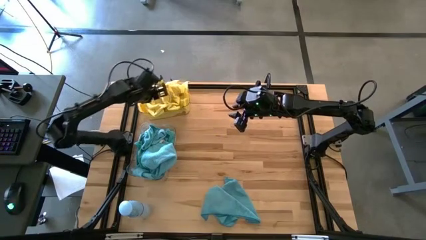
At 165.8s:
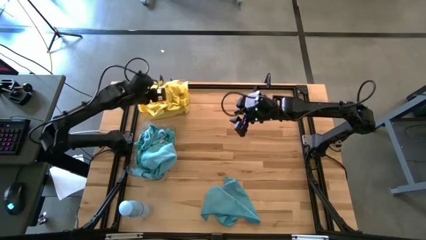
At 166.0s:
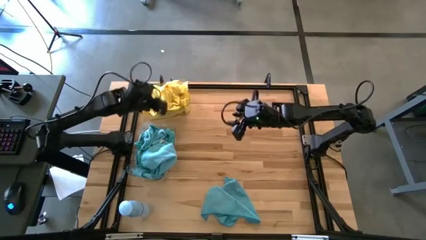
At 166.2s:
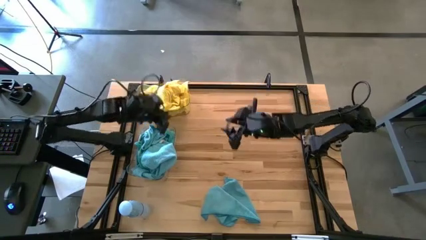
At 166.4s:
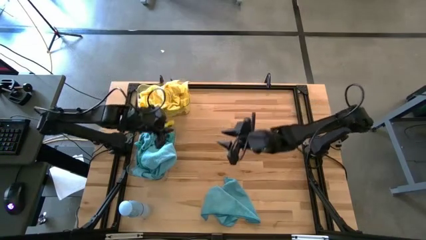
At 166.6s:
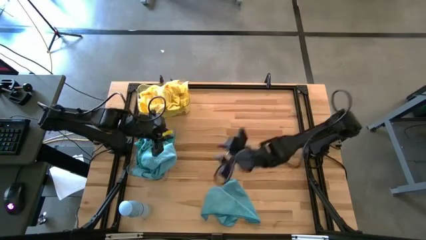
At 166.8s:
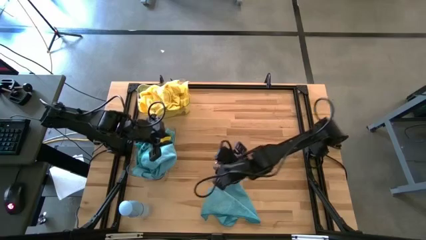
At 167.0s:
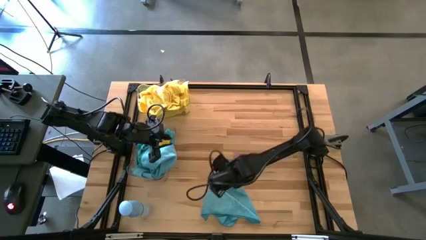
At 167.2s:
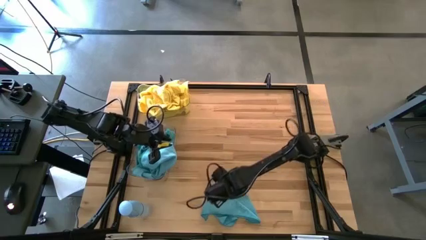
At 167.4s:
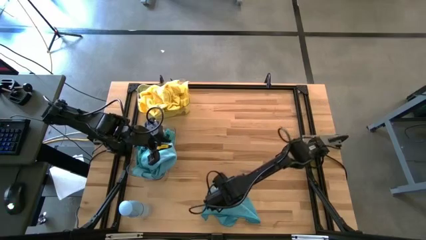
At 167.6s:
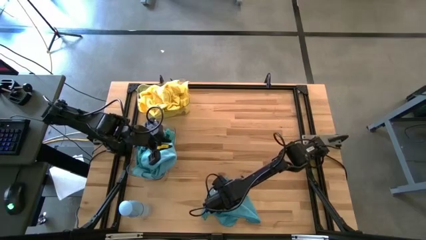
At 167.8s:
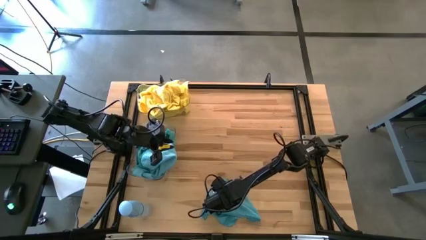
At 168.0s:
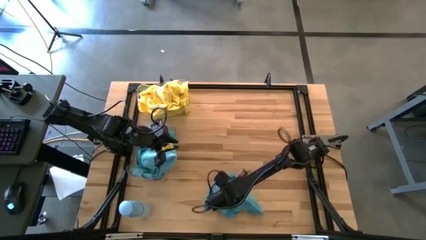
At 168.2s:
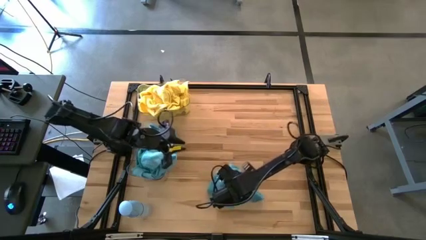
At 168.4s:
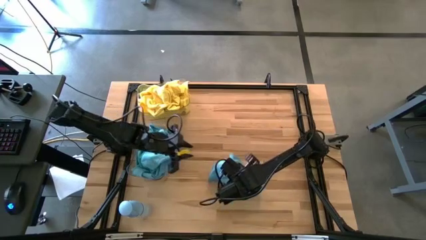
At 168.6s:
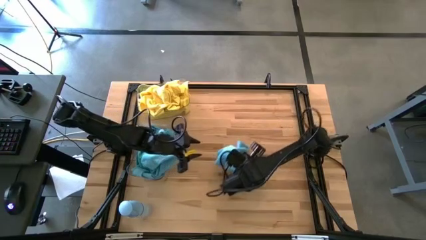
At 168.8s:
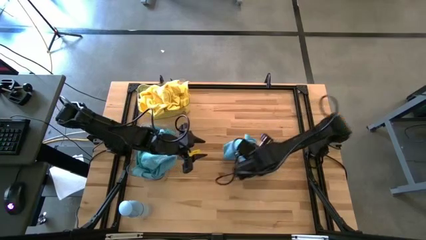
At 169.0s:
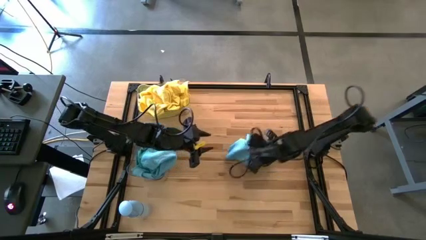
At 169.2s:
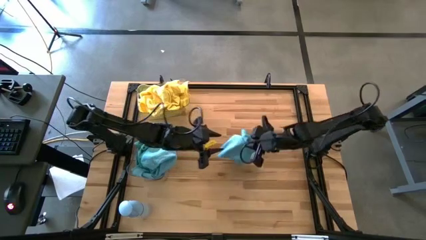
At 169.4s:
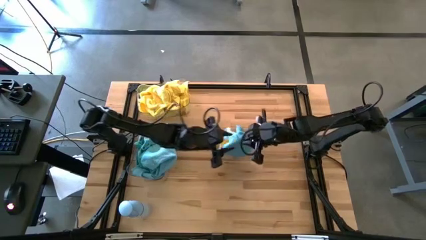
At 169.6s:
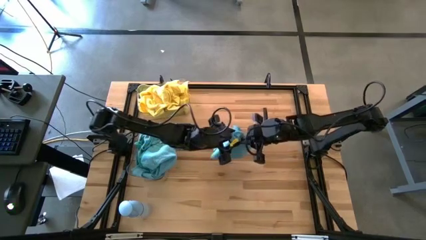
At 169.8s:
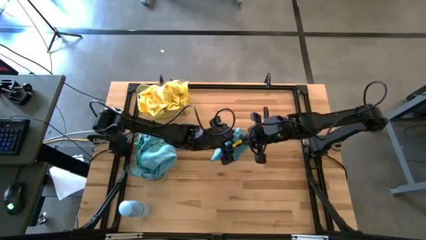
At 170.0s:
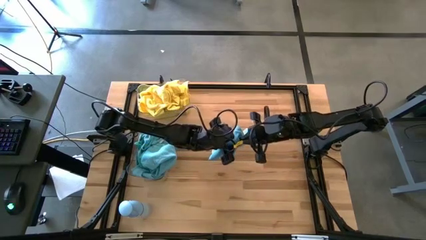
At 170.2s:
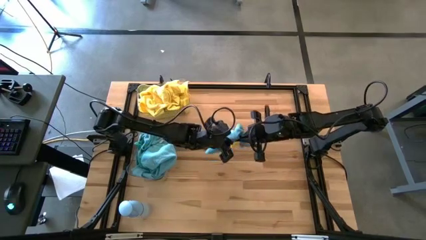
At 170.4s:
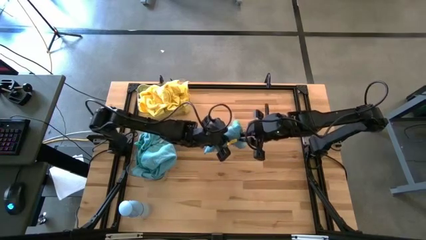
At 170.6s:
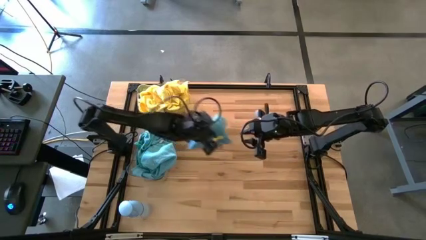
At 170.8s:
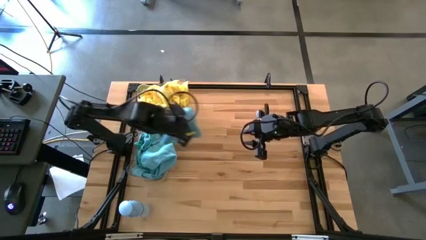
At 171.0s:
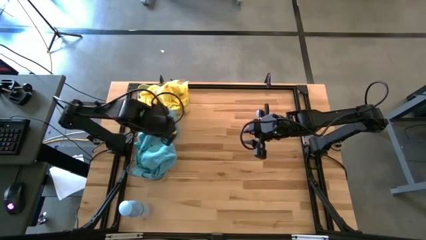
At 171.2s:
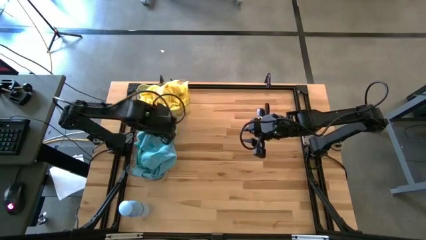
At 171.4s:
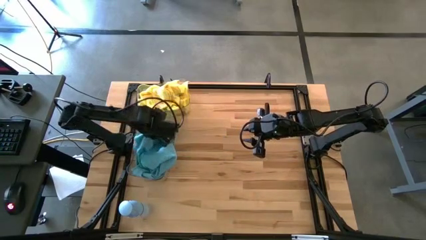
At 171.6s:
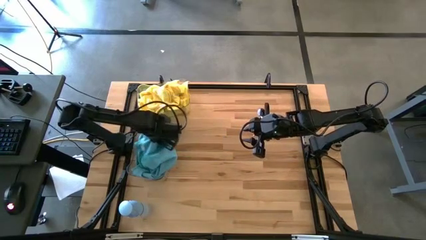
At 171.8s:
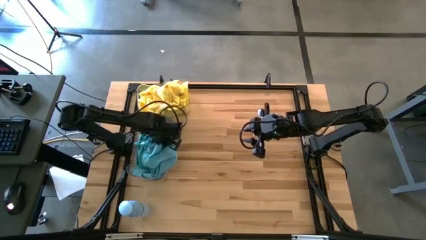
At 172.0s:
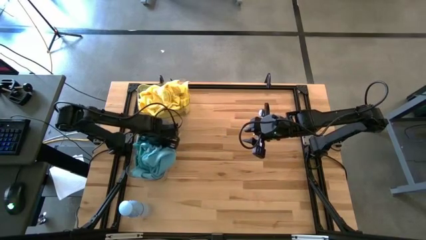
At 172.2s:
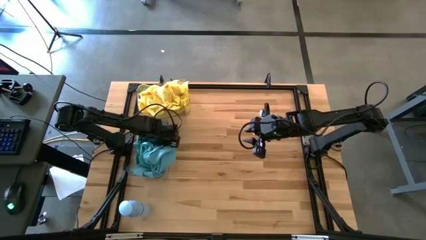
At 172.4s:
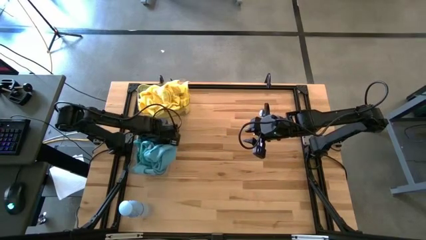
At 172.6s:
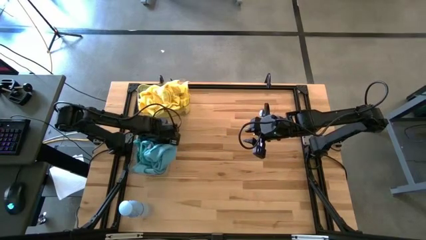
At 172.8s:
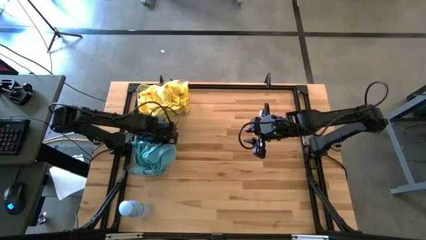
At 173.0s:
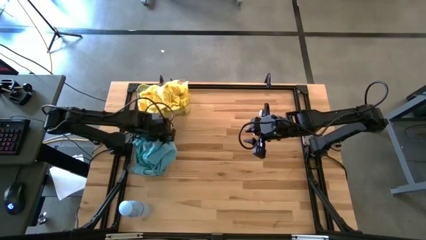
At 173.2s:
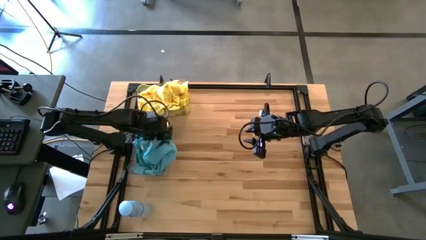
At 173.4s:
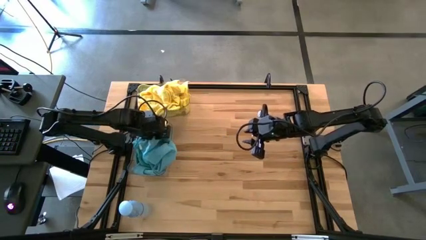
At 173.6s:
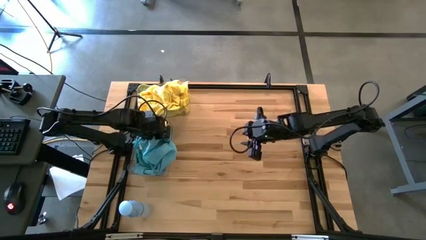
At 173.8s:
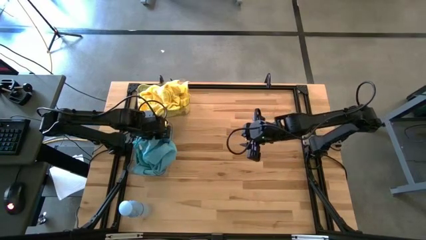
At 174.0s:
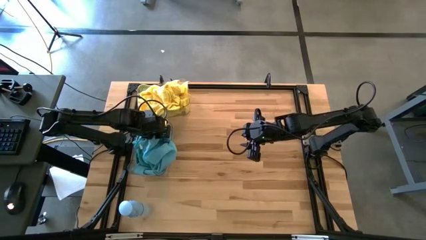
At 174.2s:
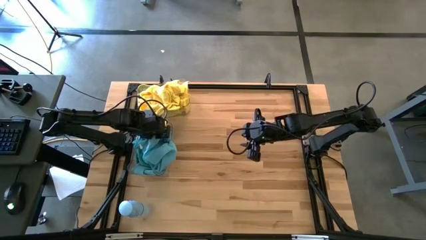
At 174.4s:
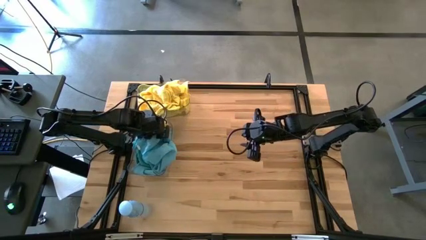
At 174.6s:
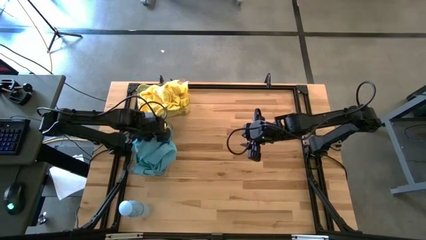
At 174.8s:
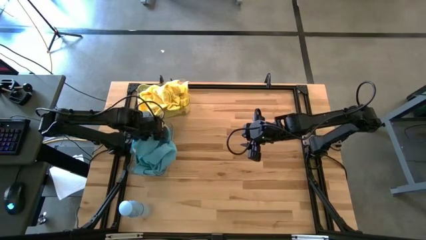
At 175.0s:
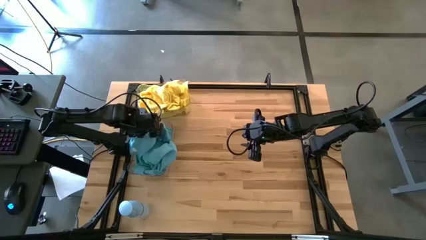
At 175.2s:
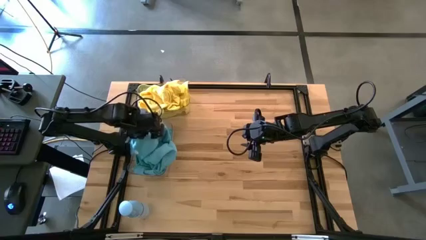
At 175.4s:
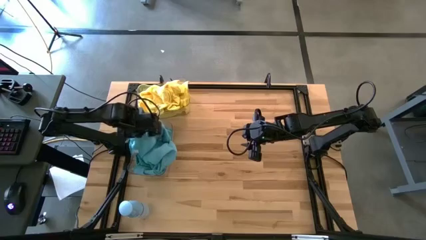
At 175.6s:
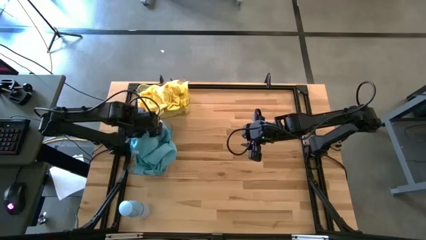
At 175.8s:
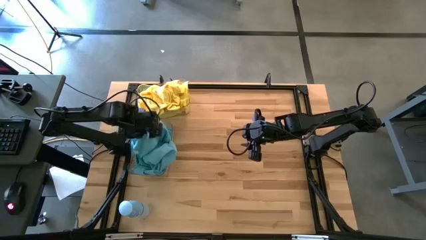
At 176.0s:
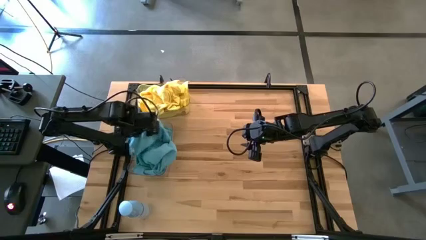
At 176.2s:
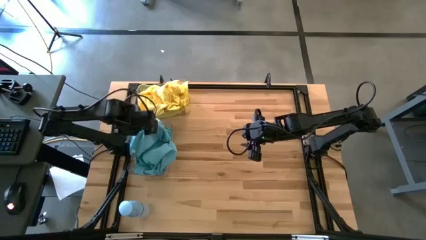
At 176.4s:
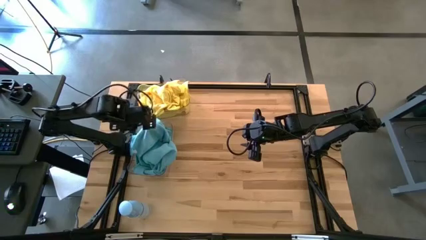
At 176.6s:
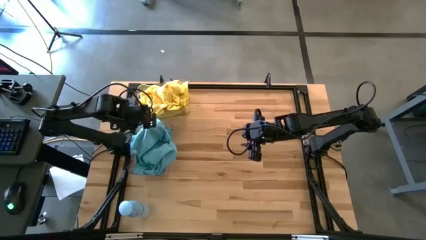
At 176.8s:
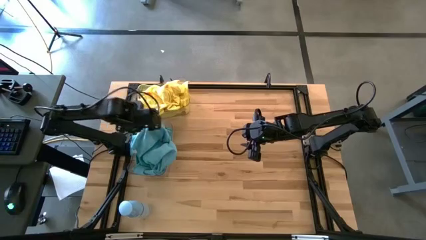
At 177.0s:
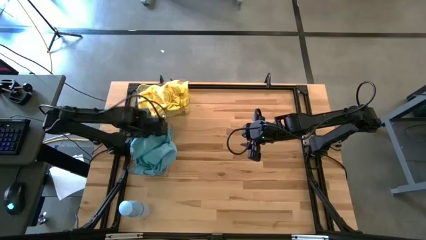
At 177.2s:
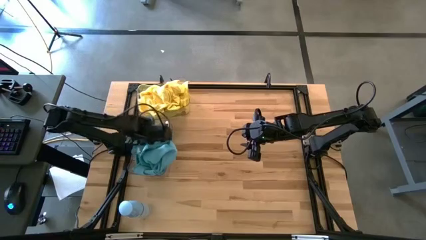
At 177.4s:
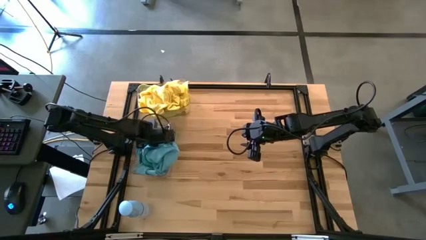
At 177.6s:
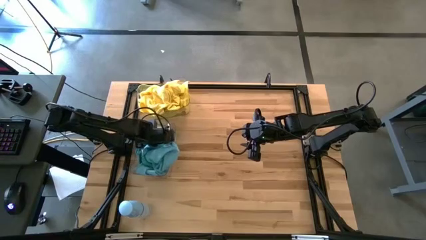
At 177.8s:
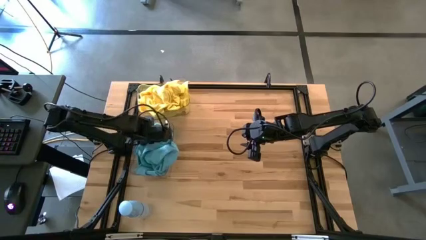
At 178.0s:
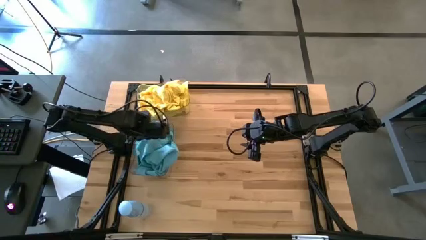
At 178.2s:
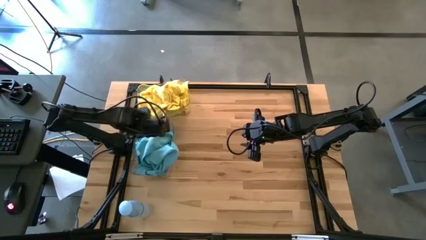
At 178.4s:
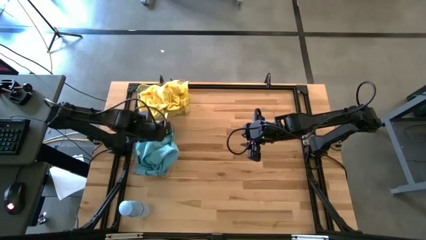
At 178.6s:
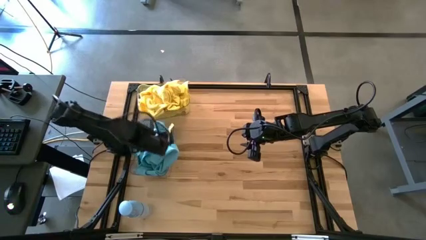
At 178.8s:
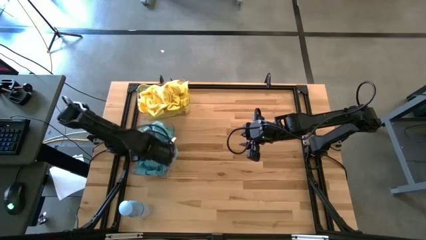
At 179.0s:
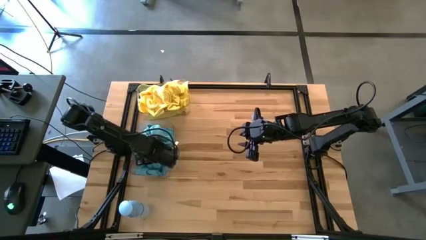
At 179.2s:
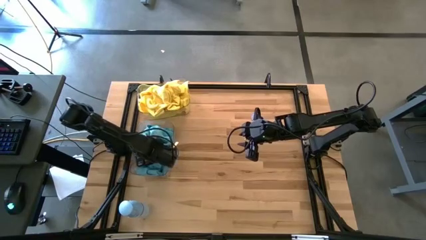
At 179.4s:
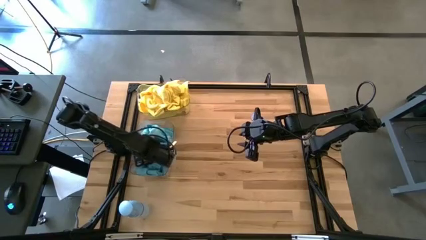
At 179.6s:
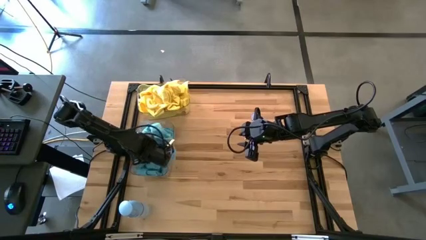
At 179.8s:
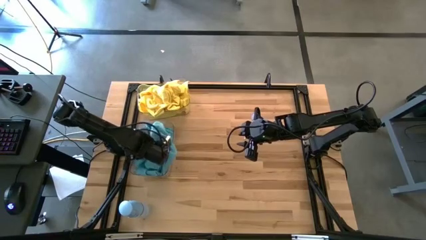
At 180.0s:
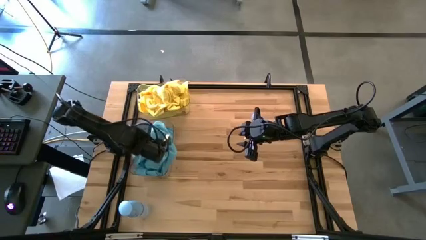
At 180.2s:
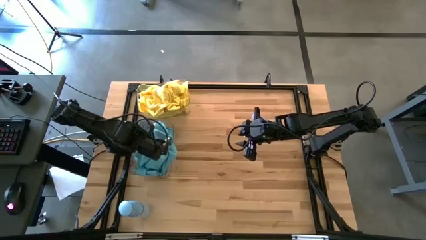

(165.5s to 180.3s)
Task: Sort microfiber towel by color & place in baskets
Put the blue microfiber cloth into the bottom transparent bin
